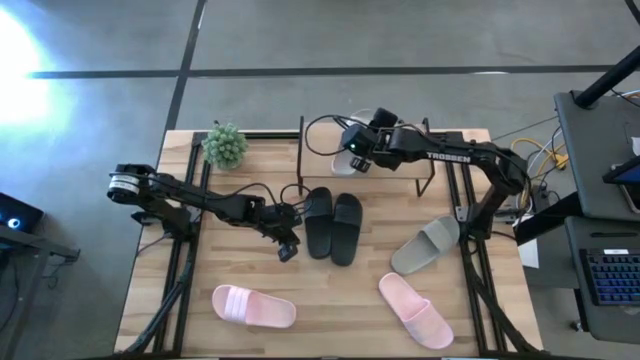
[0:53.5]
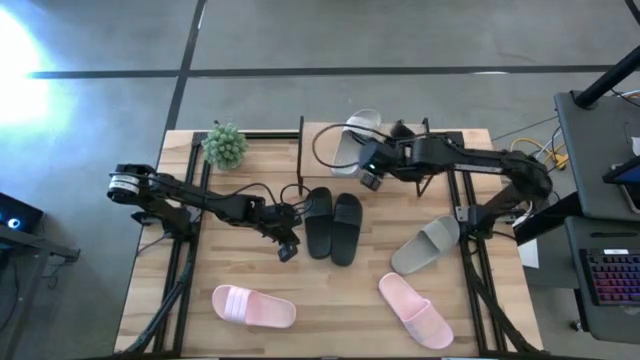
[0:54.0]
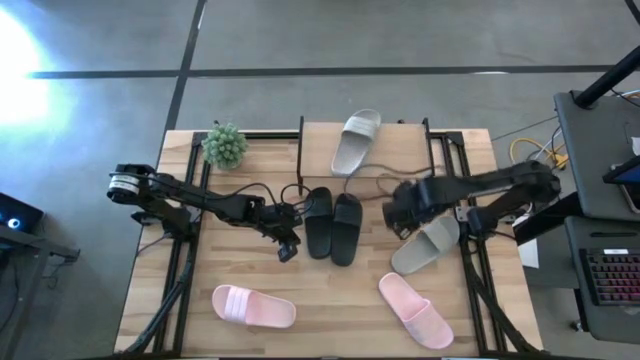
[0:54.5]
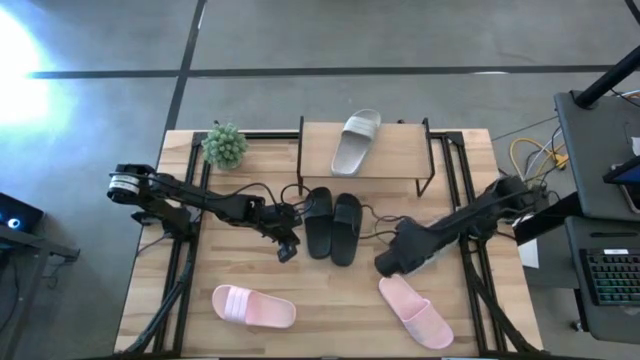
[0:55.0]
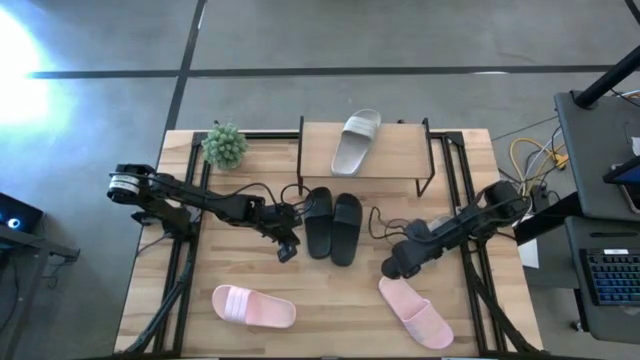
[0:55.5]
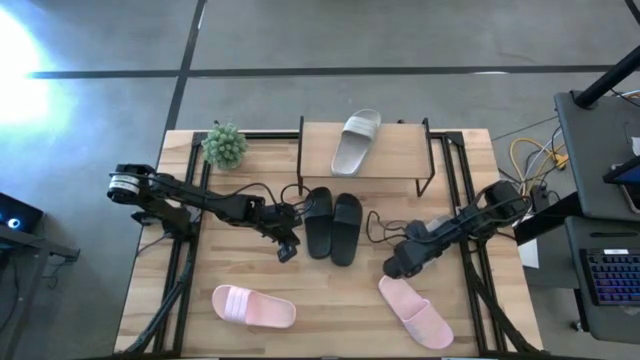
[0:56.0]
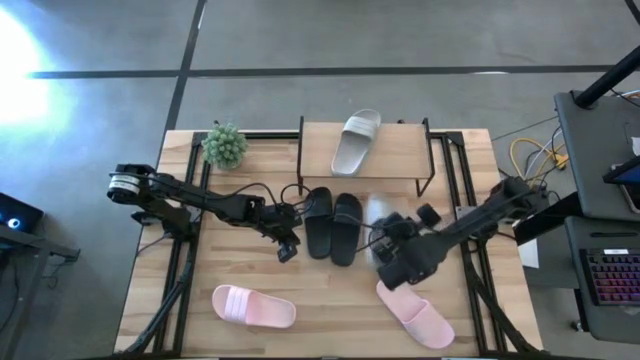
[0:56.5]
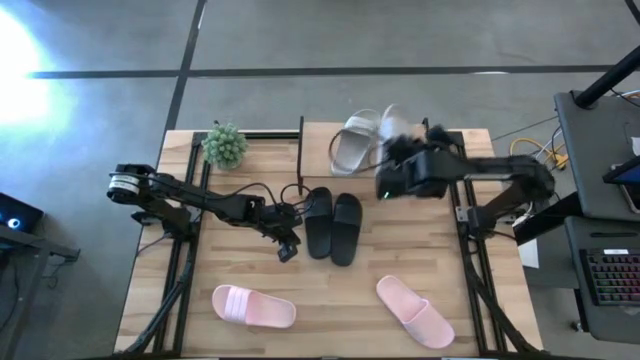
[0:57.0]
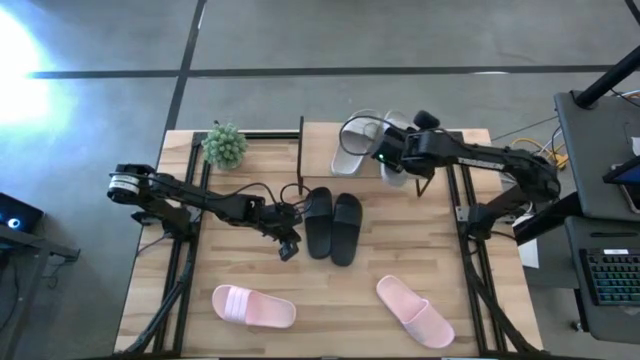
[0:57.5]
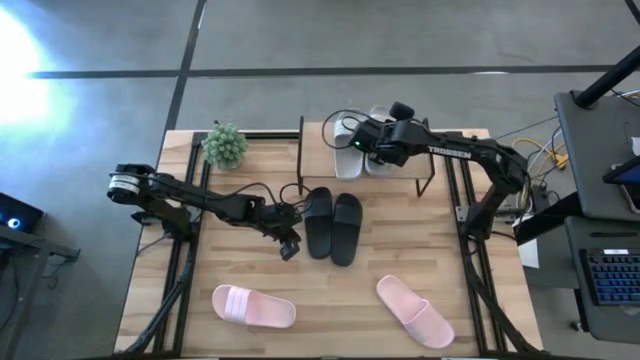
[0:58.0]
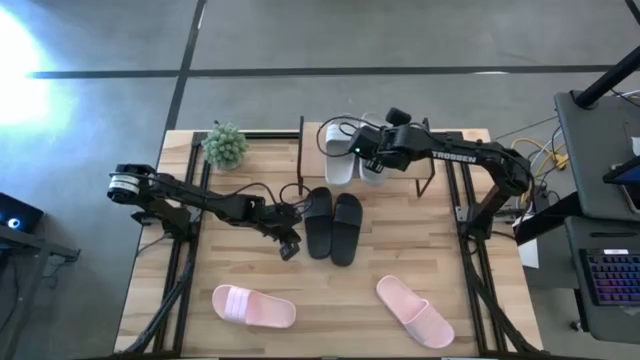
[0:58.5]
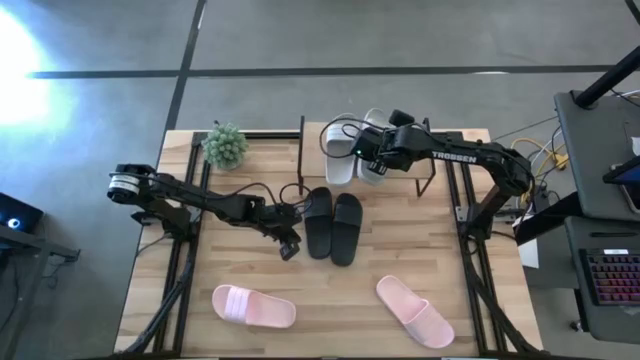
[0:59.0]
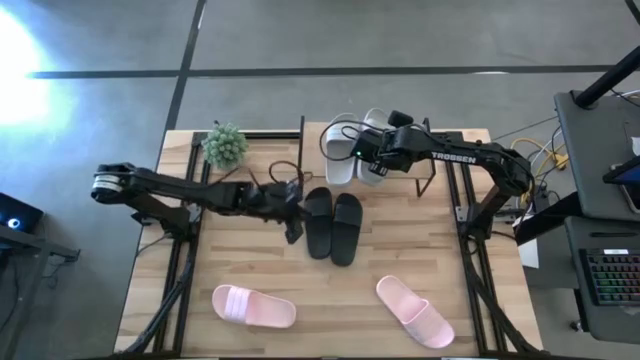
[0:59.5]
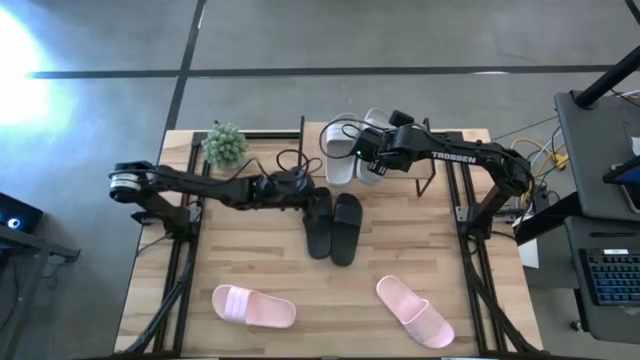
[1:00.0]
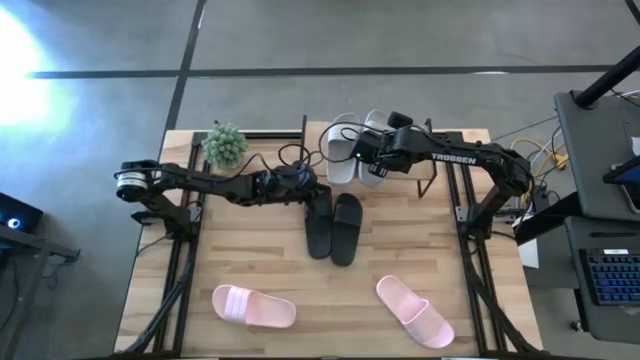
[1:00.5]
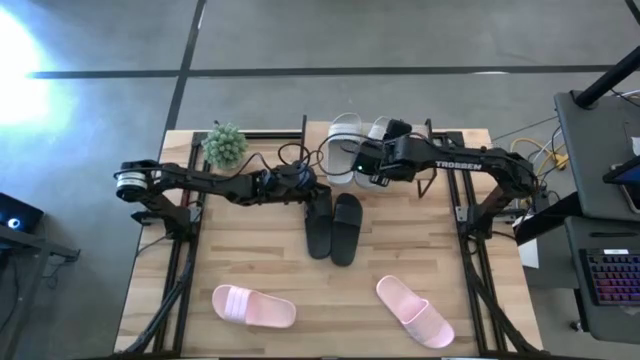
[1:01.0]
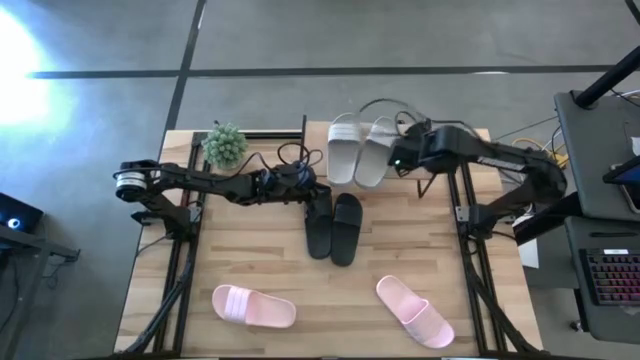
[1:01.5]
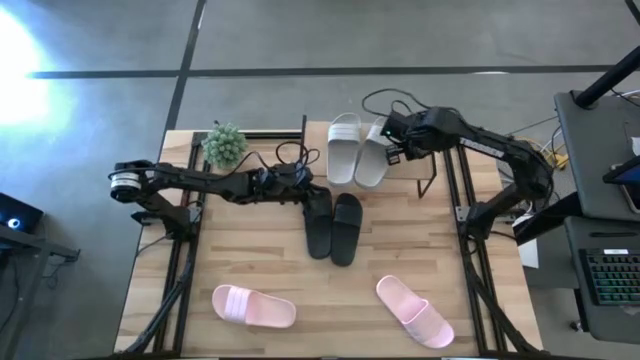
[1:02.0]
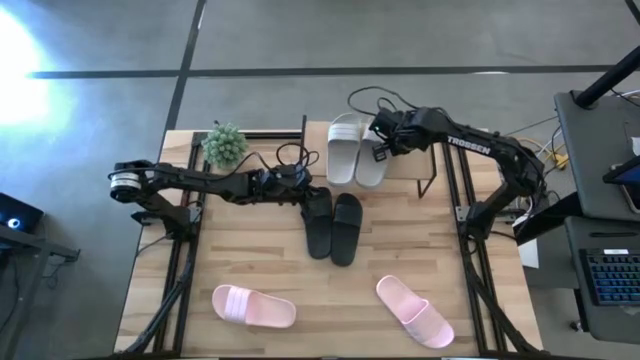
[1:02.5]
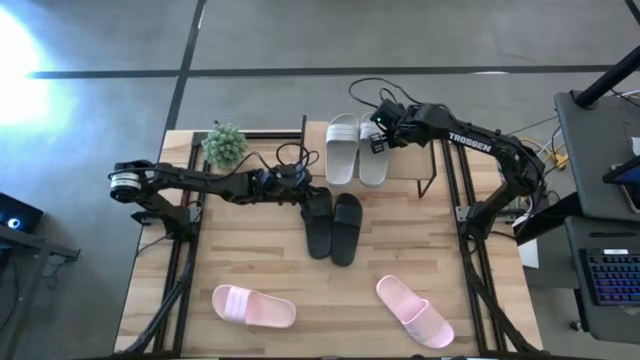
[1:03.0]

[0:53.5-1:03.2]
Task: Pick and place slides into the shelf
Put the gray slipper on the shelf

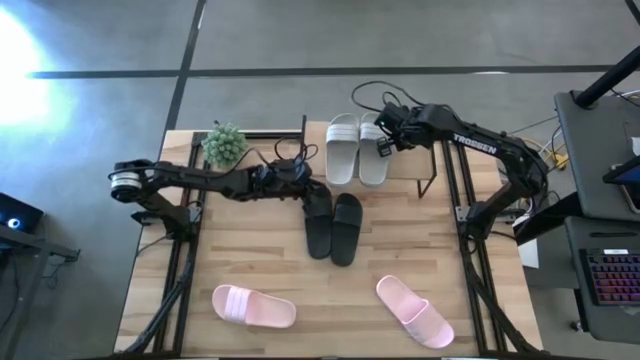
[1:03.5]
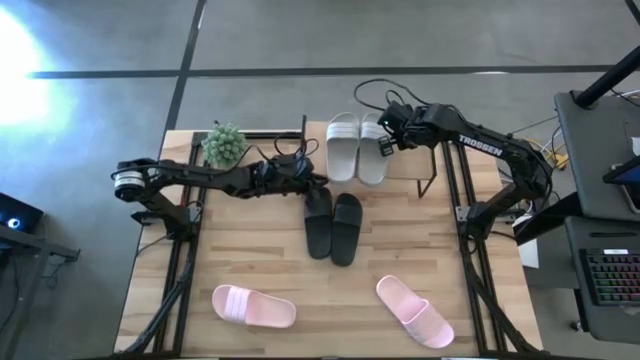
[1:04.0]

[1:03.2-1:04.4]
Adjust the gray slipper on the shelf

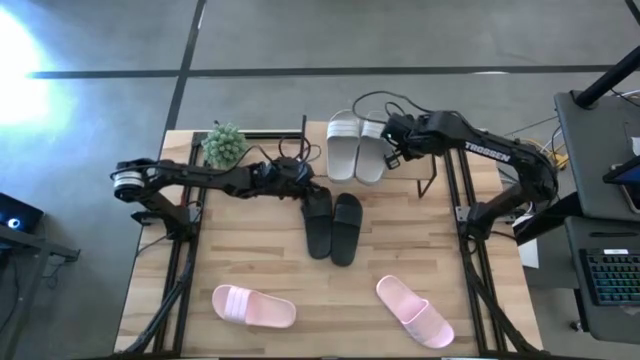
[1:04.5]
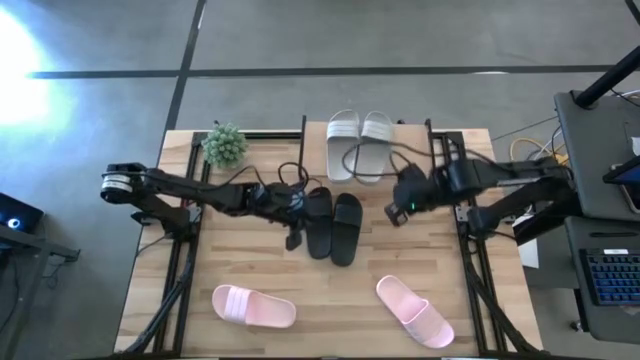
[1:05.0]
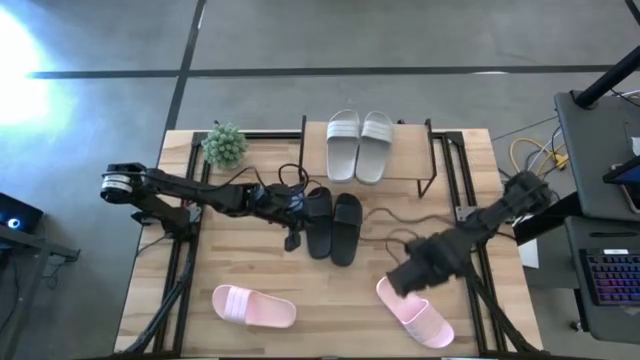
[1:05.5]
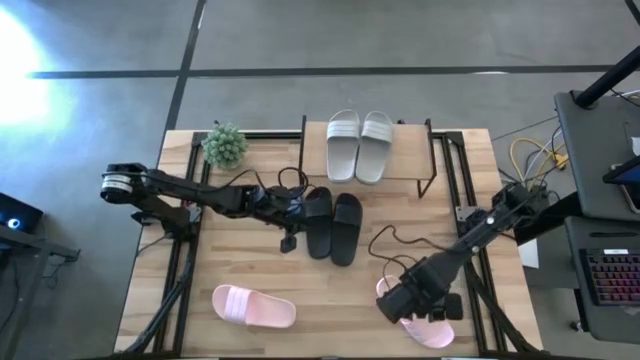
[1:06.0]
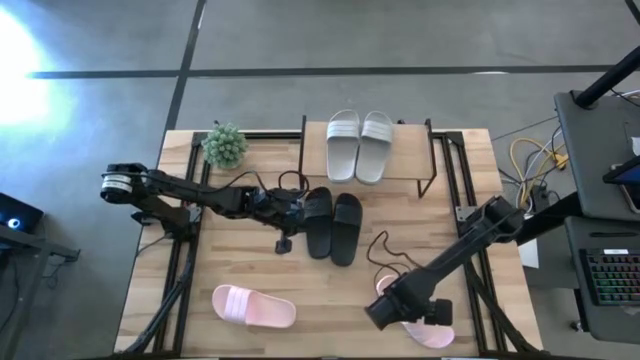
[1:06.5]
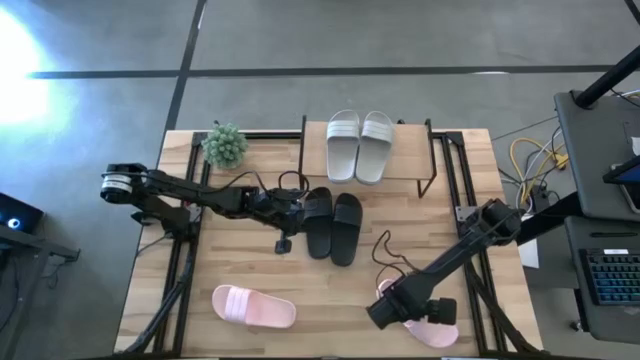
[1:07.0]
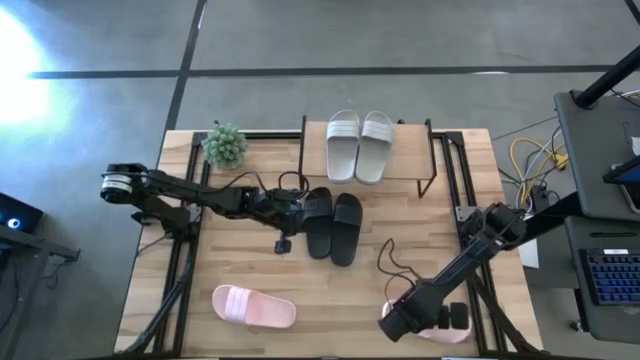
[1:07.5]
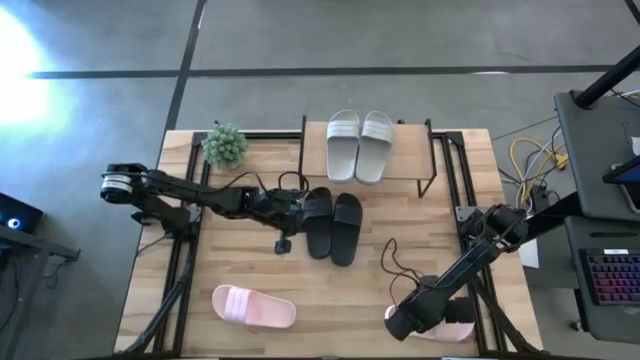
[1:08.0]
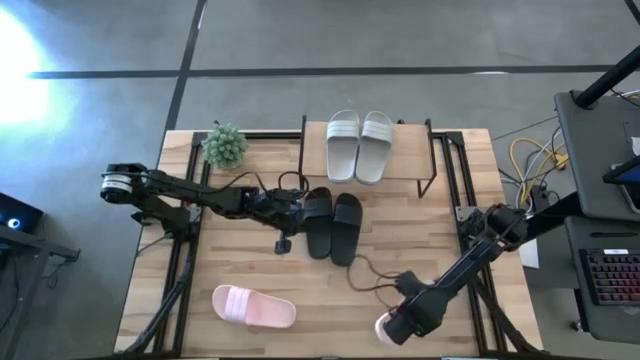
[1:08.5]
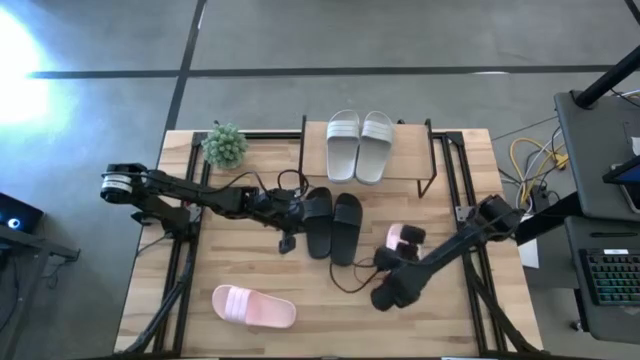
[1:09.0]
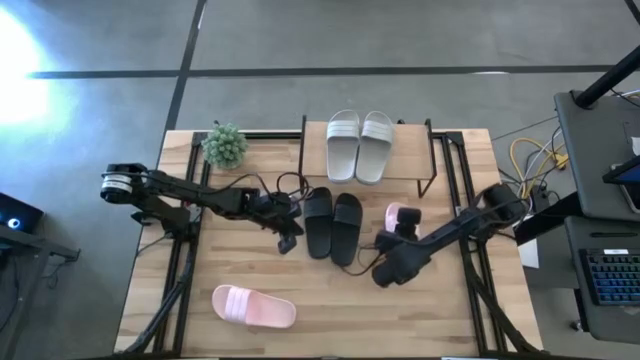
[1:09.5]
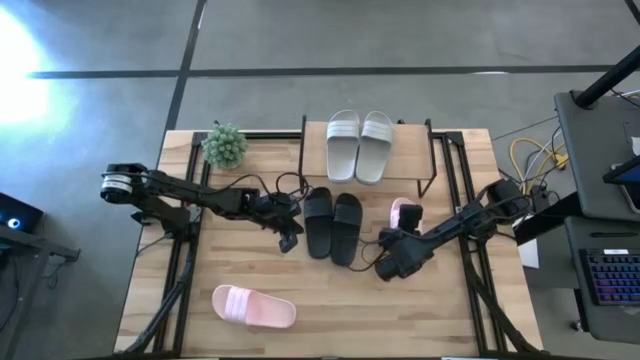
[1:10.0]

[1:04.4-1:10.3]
Move the right pink slipper to the top right of the table

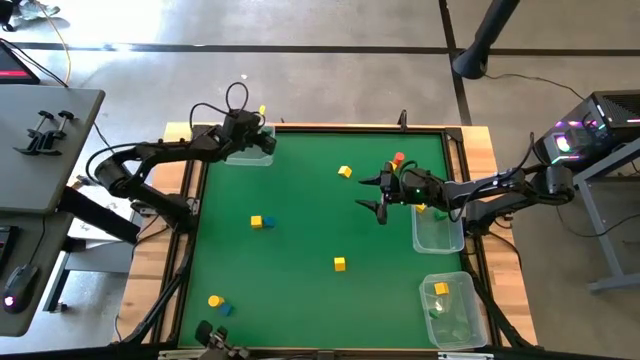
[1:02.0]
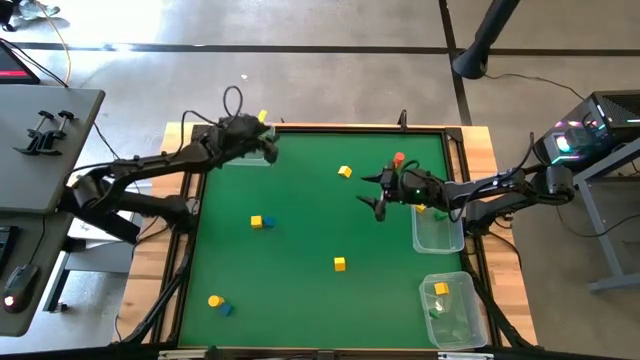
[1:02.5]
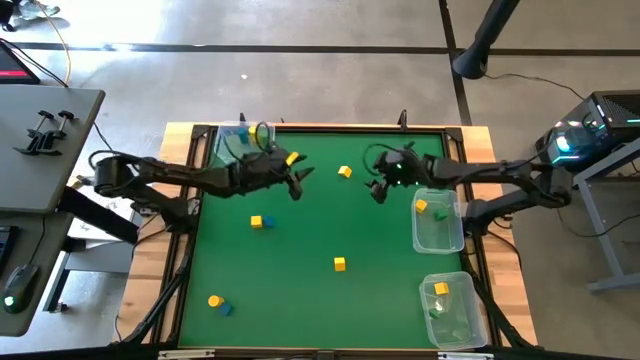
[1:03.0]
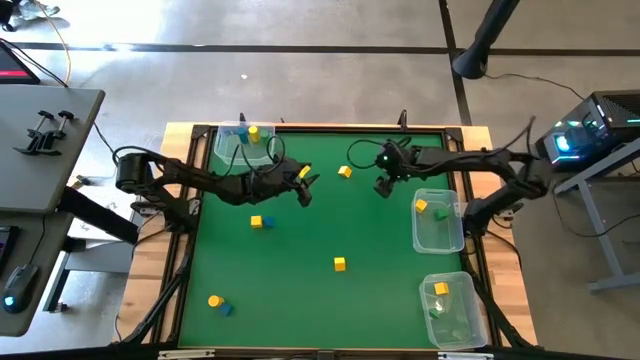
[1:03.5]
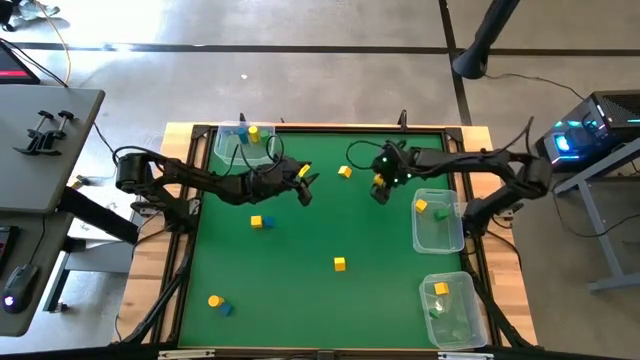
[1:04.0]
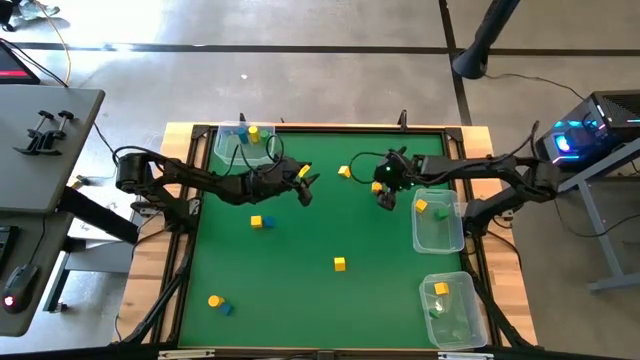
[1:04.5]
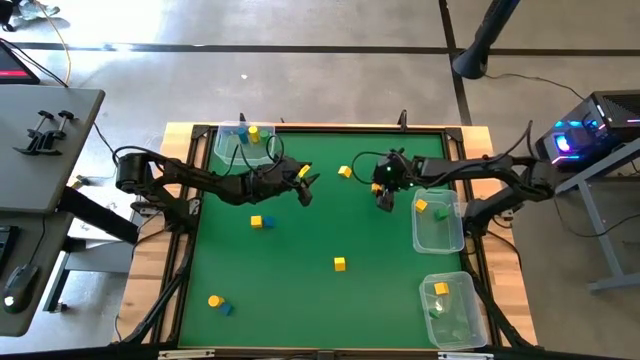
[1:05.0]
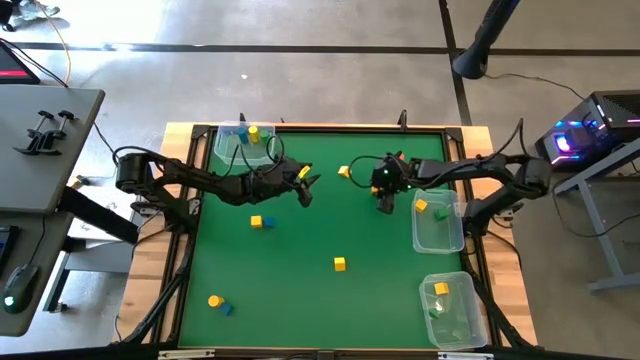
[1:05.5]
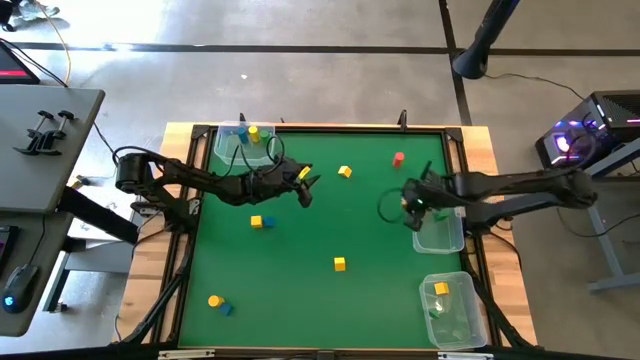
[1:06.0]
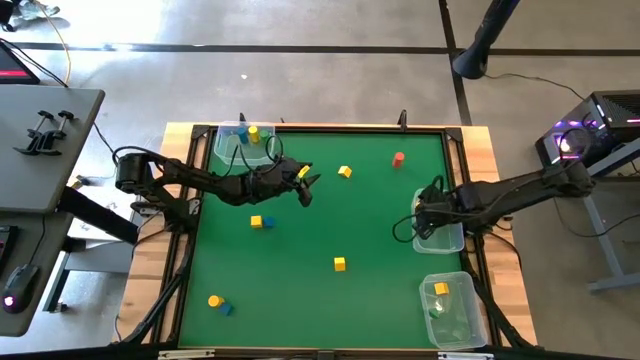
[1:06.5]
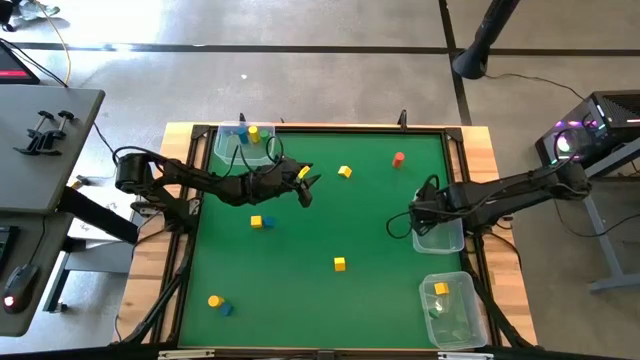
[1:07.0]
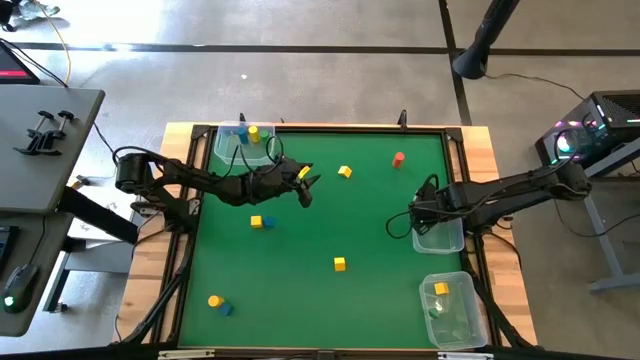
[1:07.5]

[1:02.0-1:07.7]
Task: Sort blocks by size
Put the top yellow cube block into the middle transparent bin
